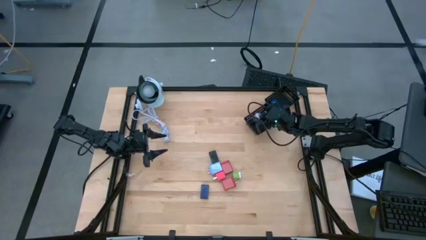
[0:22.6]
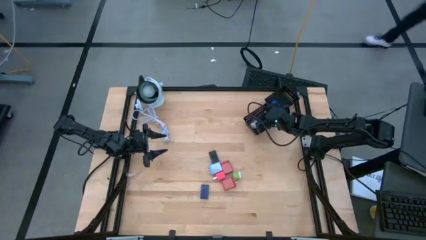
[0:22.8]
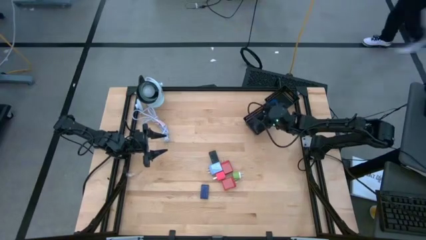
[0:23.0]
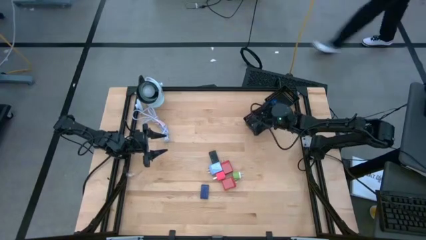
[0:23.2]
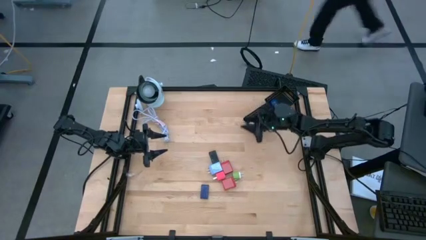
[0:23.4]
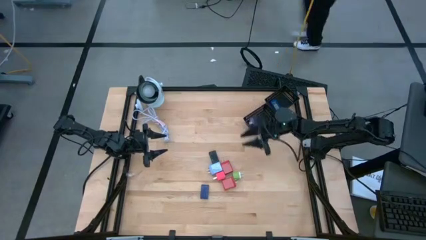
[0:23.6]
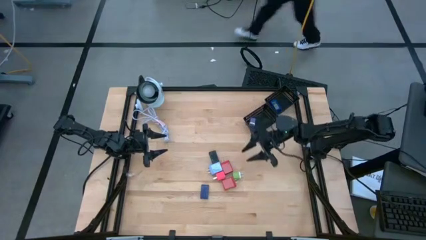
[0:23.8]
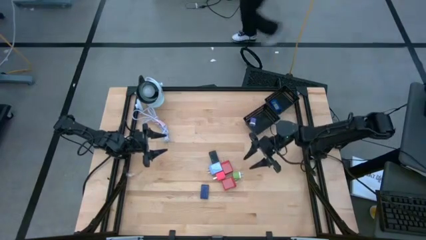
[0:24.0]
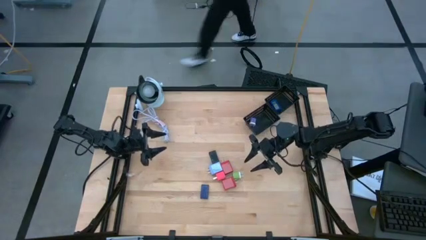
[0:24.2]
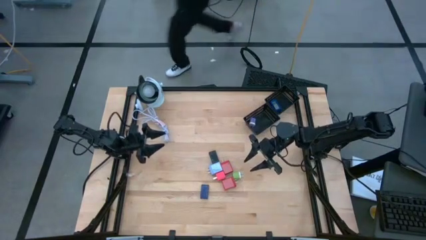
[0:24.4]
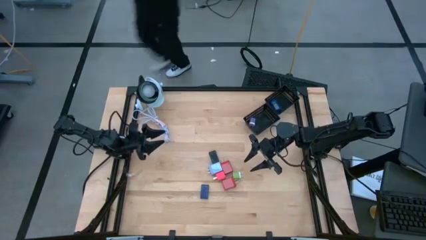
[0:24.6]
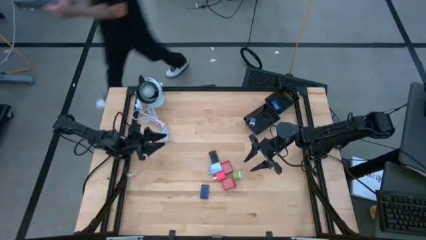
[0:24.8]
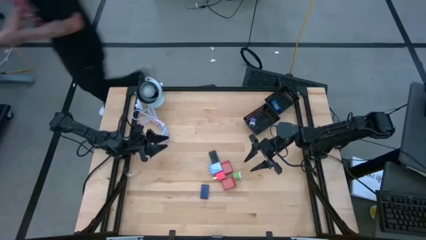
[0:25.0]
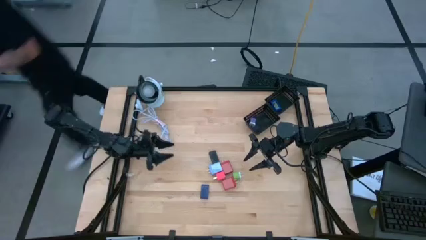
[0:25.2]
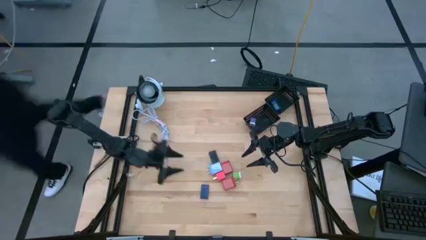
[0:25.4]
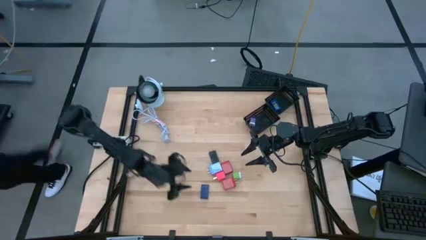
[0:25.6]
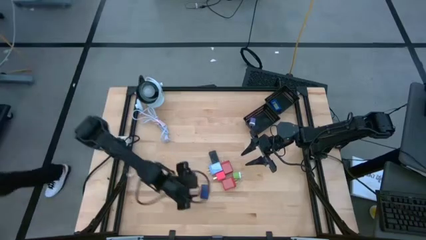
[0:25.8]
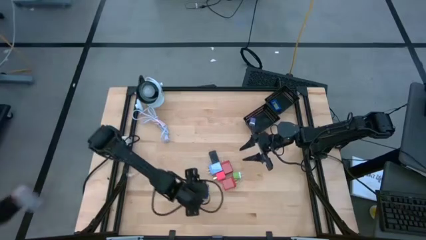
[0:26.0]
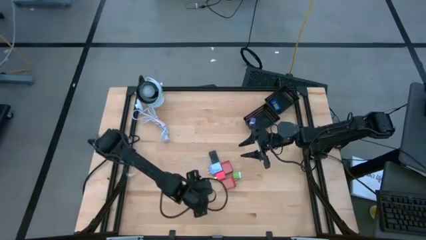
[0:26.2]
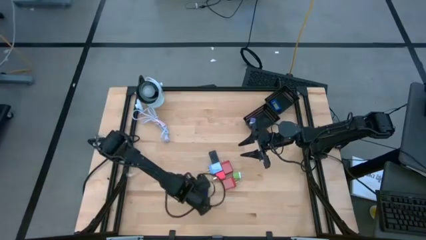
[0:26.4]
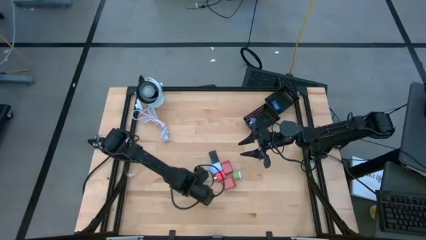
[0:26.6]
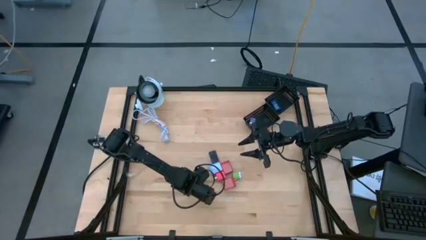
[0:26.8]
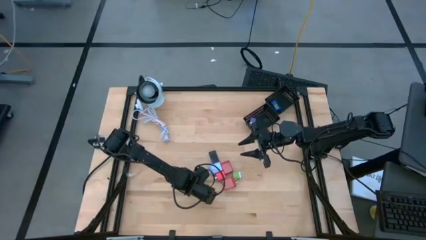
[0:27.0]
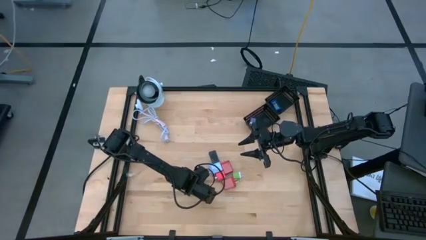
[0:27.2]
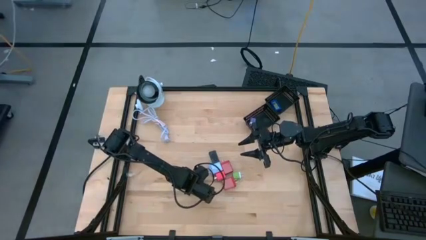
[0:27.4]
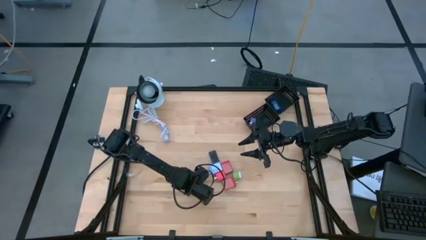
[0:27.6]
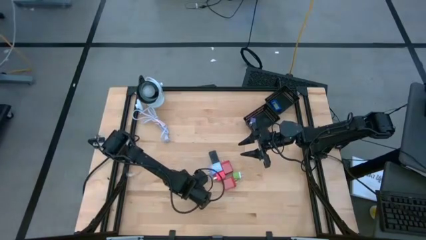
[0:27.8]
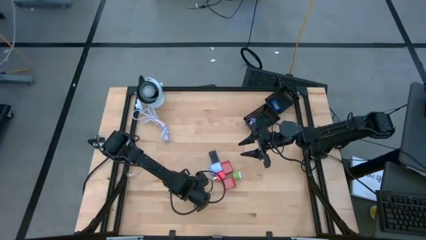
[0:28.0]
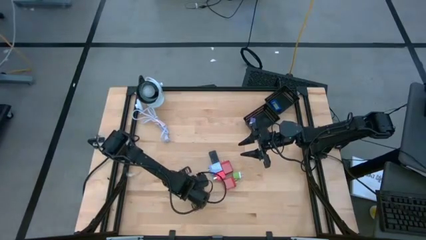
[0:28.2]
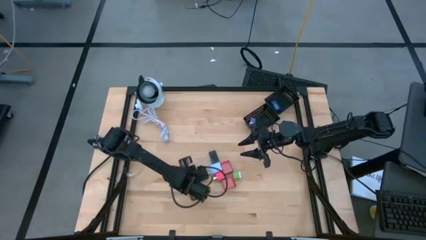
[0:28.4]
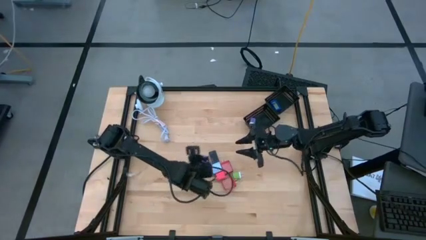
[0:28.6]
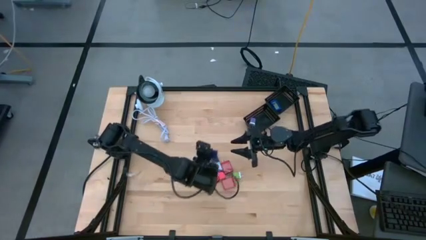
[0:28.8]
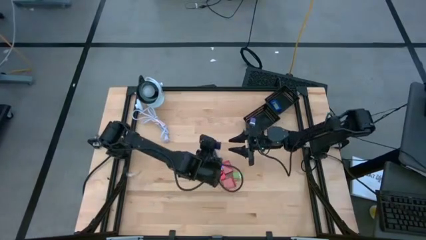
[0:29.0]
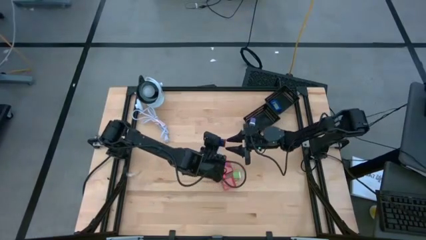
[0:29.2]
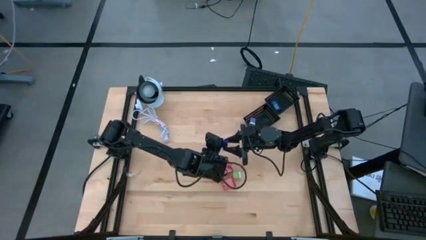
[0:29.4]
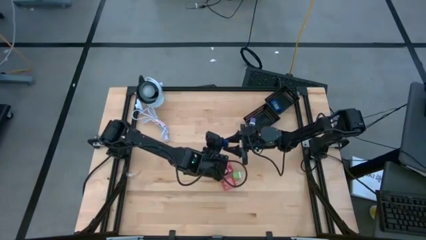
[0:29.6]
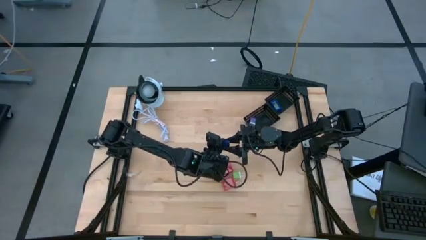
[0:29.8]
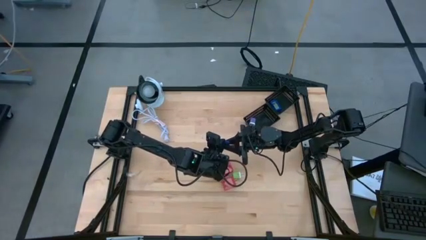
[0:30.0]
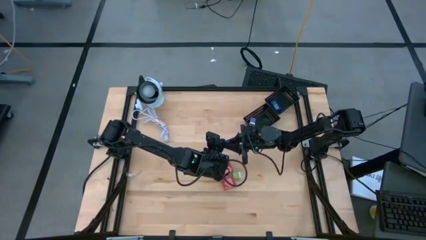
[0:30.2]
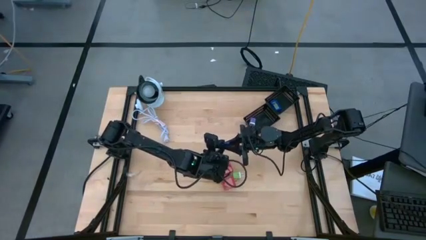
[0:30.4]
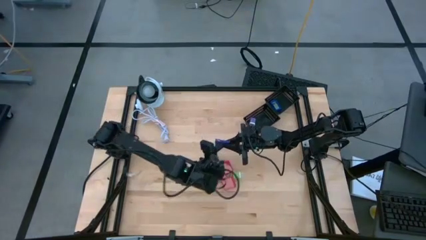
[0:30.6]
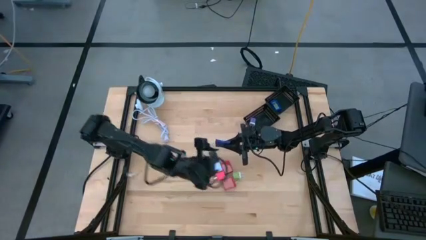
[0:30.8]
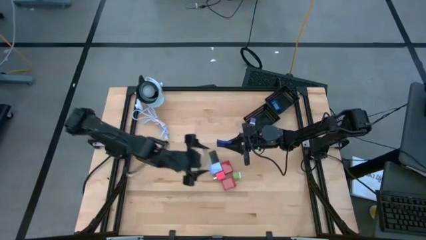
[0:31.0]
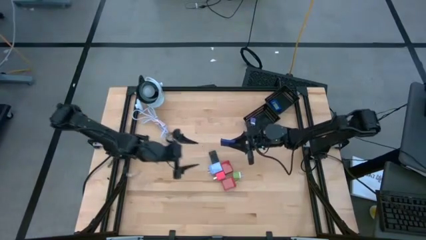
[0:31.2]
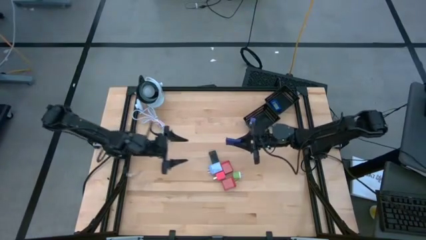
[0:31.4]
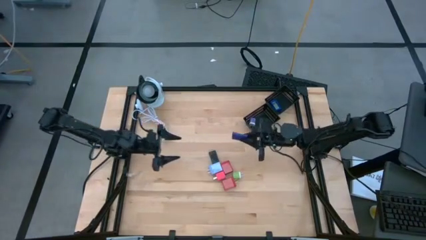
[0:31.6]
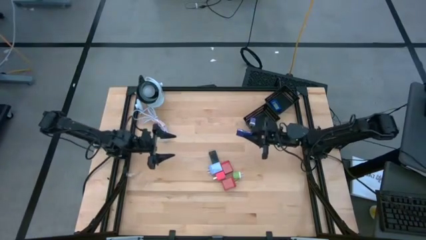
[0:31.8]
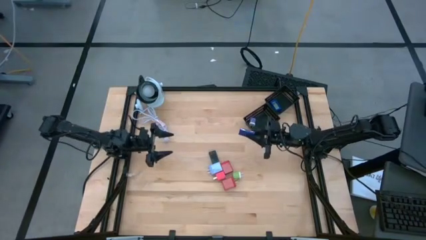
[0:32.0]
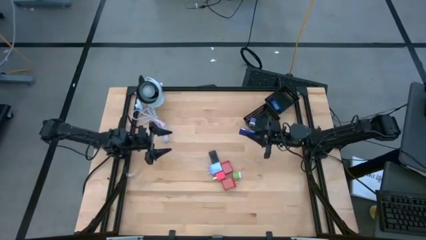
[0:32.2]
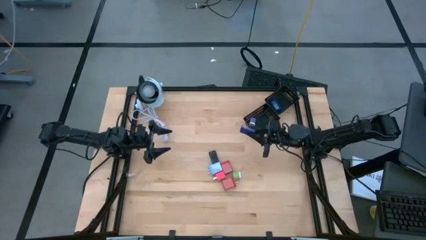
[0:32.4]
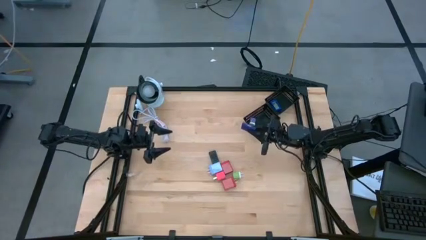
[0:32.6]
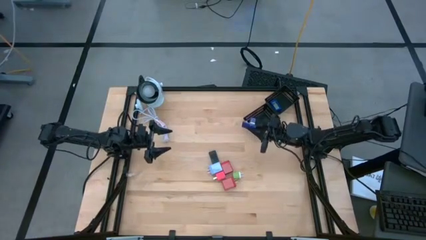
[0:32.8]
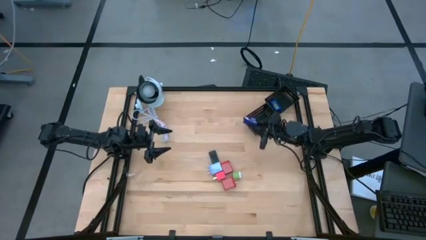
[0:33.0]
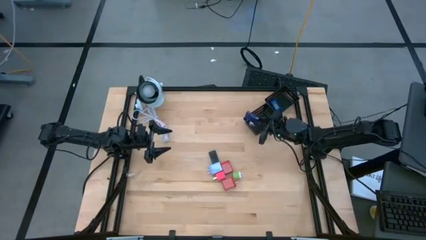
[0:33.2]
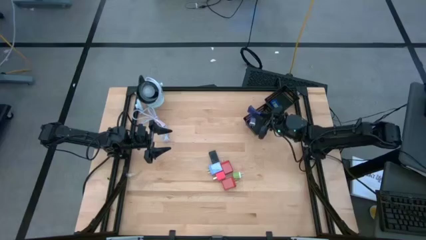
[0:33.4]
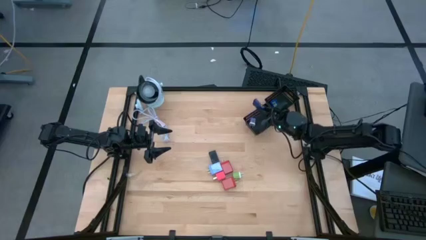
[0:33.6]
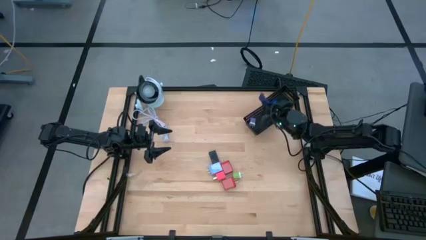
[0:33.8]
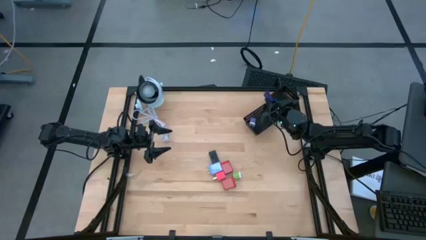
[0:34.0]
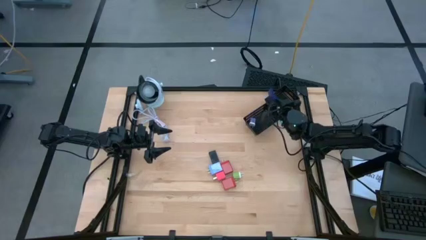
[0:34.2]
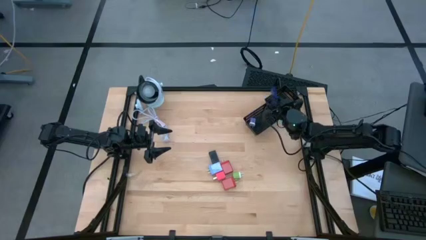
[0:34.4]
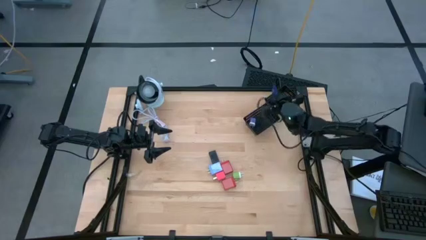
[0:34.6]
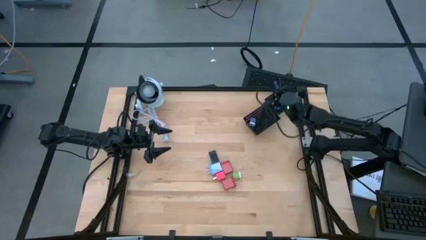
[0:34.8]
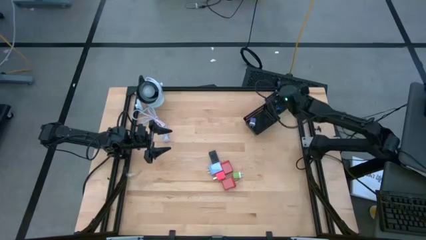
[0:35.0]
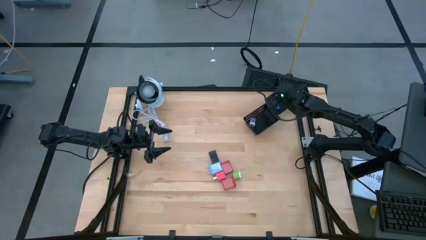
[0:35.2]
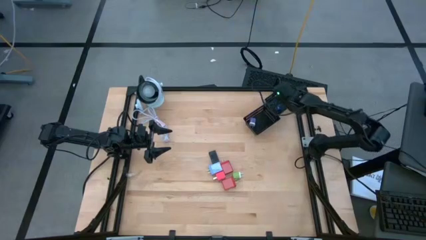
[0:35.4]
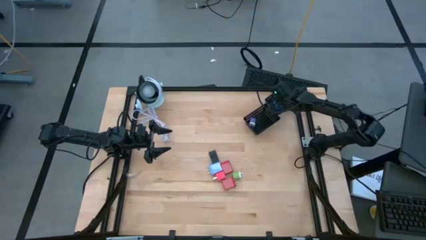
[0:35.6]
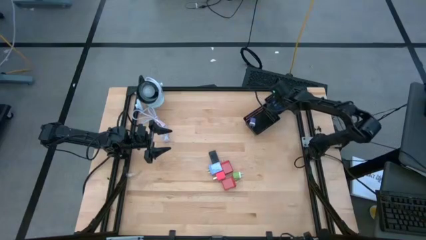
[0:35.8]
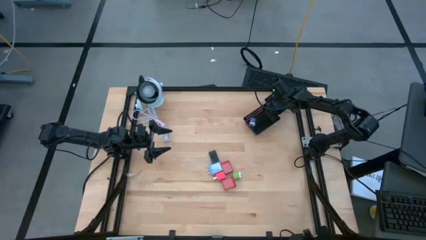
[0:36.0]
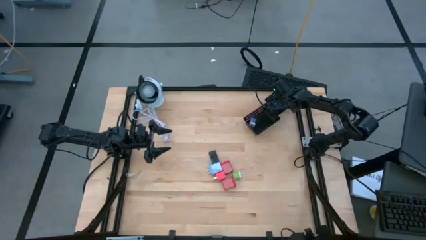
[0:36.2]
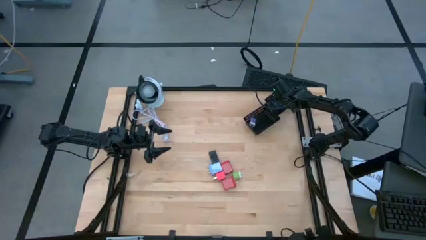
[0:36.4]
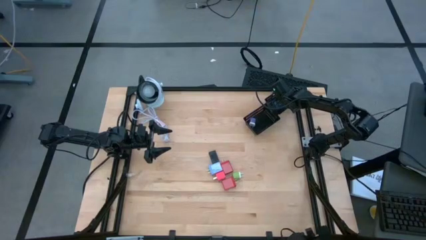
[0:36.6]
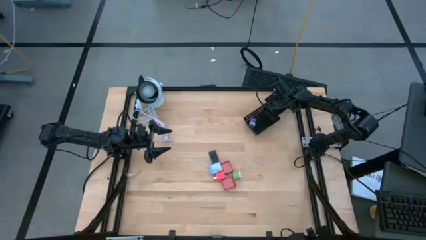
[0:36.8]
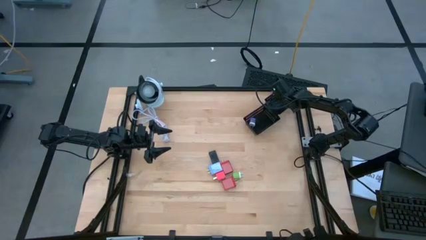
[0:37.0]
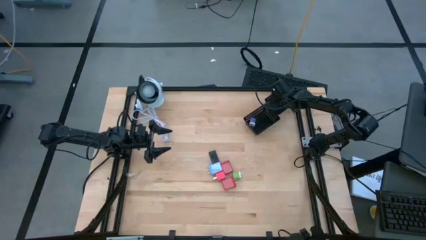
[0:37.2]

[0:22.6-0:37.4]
Task: Pick & Place Office items
Put the violet digital timer into the top black bin
